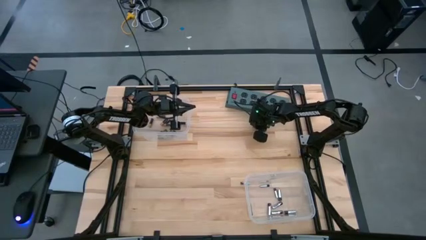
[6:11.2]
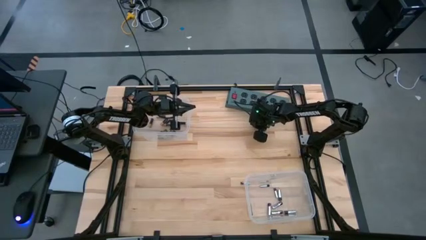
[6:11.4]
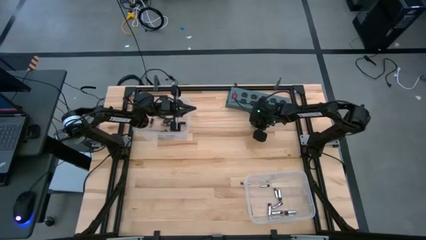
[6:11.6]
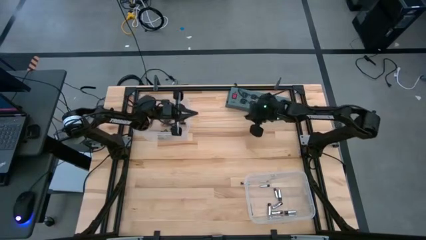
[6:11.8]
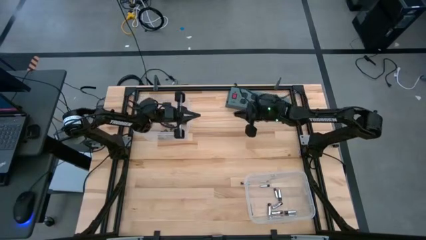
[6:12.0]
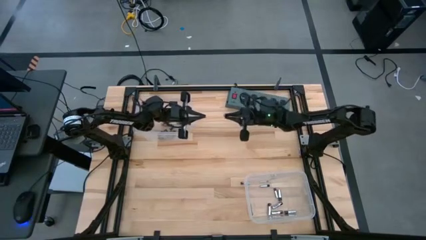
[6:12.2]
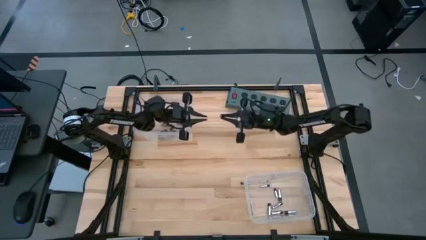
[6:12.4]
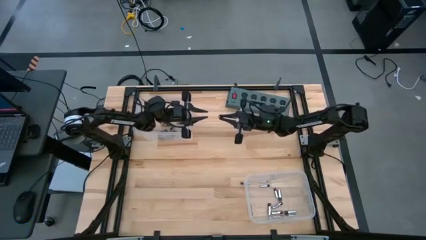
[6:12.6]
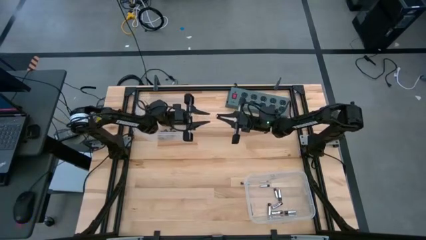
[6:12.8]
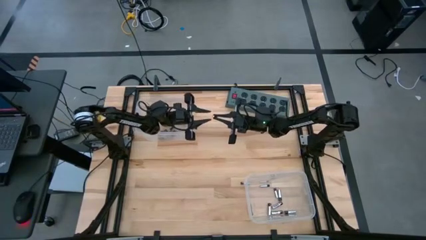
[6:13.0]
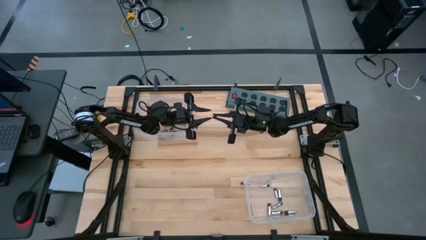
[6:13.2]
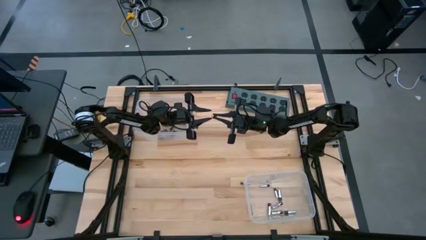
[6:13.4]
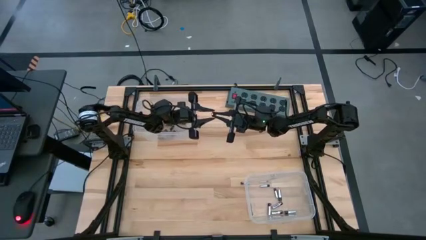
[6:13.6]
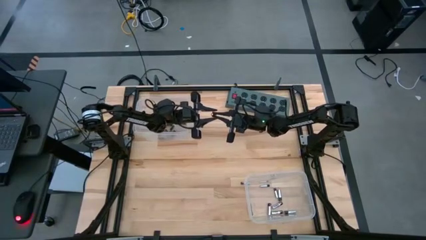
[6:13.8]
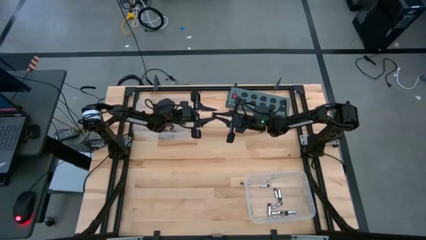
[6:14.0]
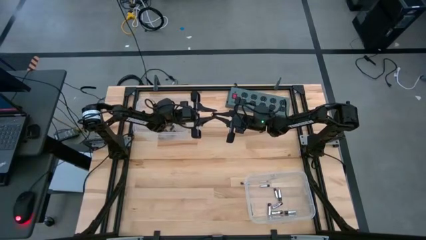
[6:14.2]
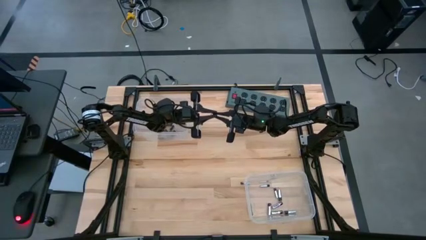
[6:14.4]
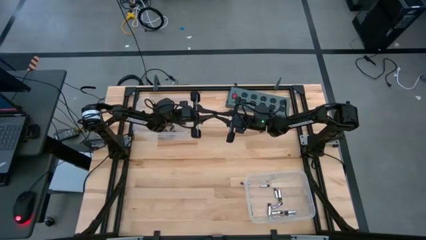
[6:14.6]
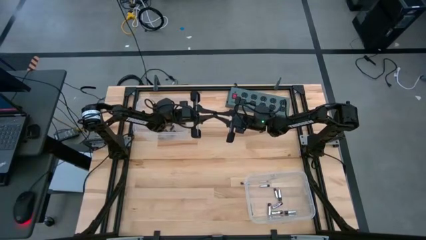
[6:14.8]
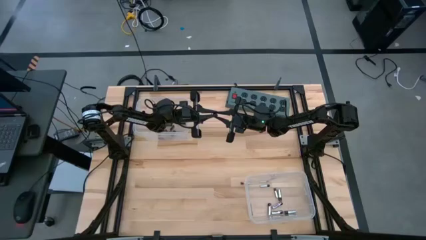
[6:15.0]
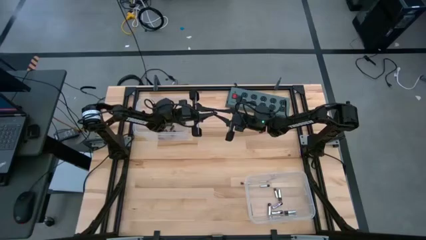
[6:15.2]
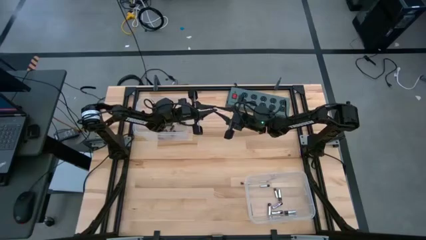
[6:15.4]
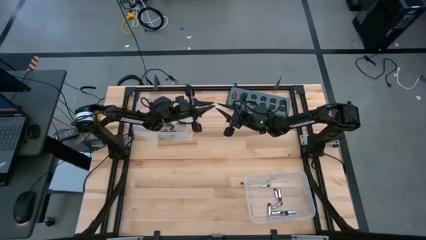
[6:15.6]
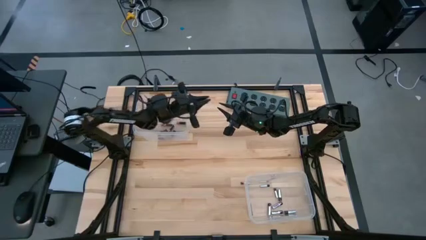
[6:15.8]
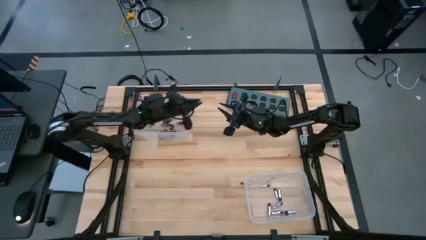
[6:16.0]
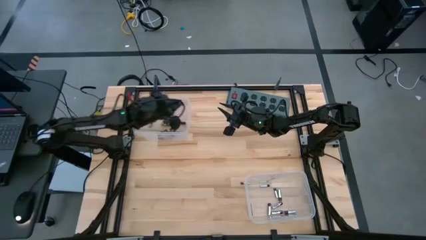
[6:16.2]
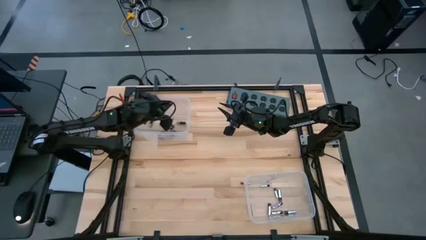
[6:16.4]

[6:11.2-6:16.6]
Task: Sort batteries
Put the black battery into the top transparent bin

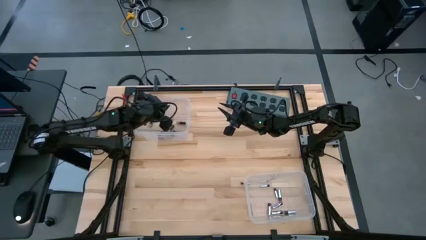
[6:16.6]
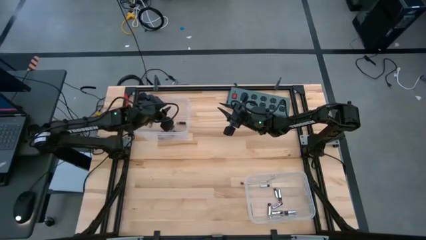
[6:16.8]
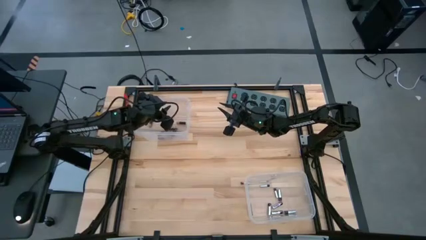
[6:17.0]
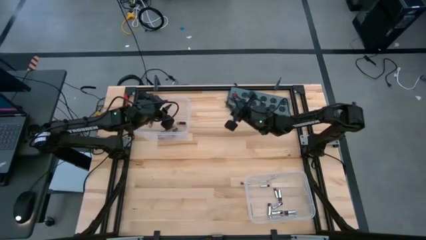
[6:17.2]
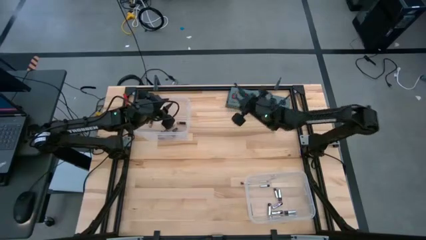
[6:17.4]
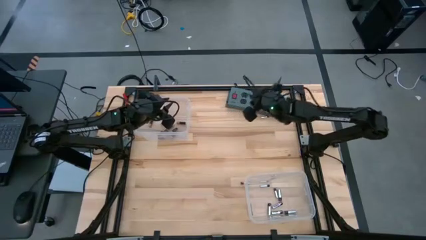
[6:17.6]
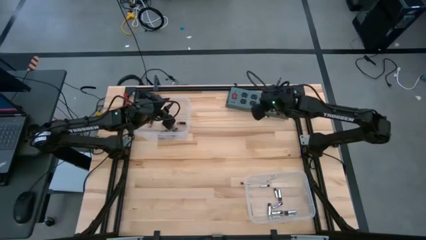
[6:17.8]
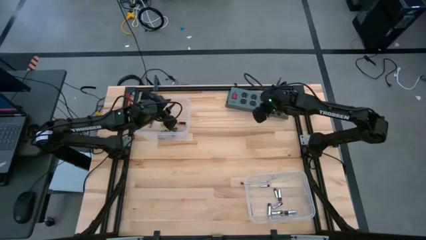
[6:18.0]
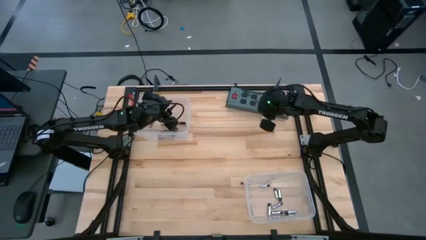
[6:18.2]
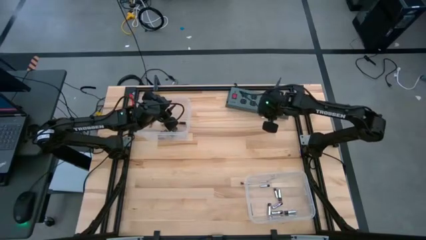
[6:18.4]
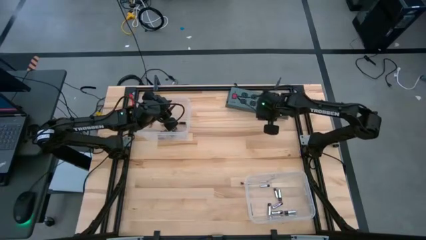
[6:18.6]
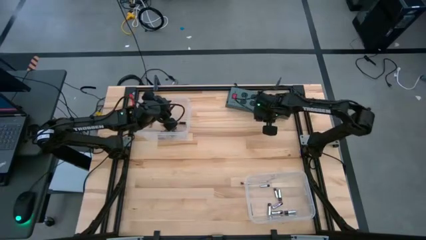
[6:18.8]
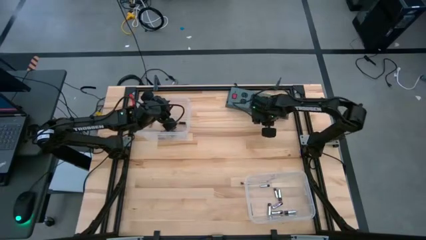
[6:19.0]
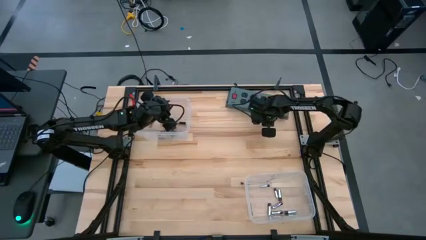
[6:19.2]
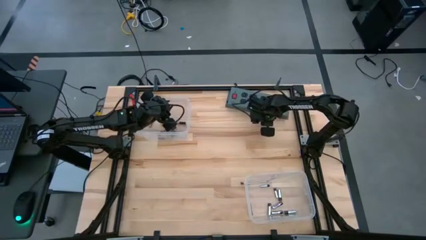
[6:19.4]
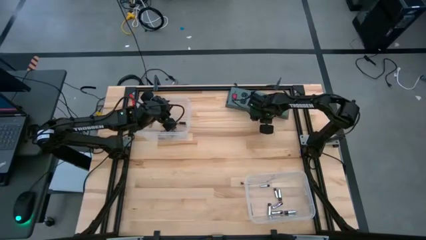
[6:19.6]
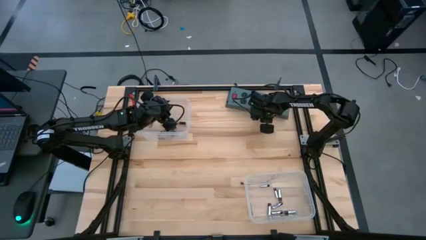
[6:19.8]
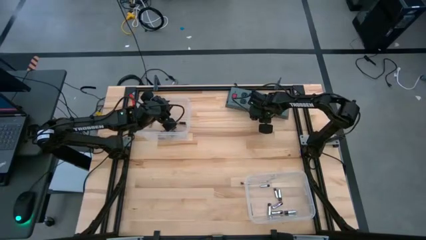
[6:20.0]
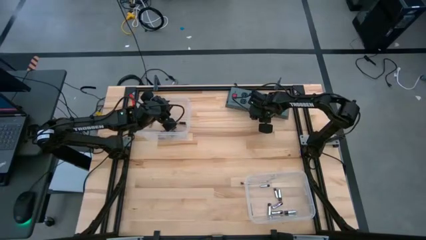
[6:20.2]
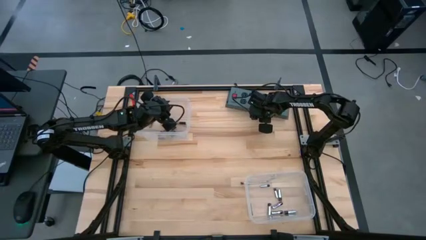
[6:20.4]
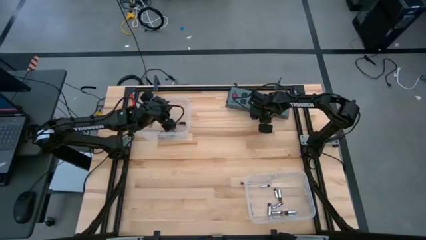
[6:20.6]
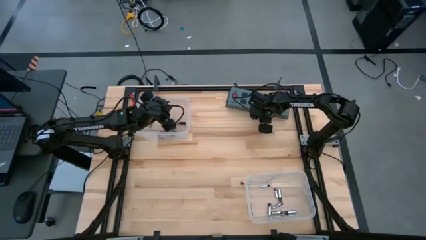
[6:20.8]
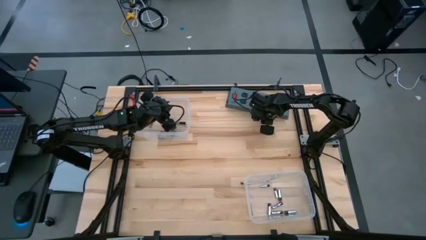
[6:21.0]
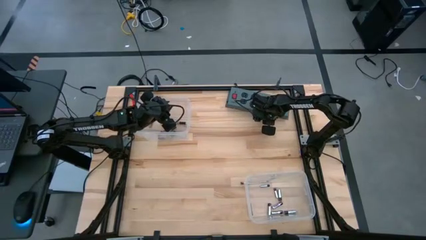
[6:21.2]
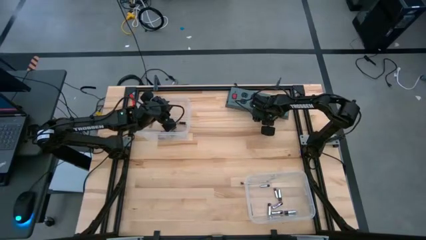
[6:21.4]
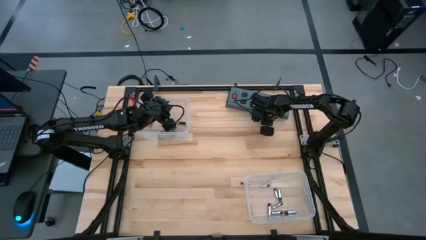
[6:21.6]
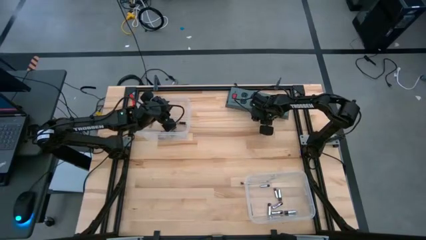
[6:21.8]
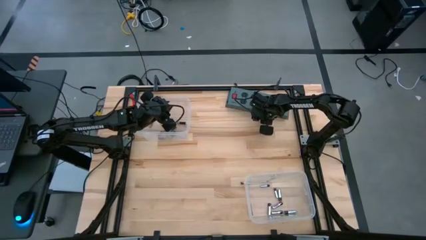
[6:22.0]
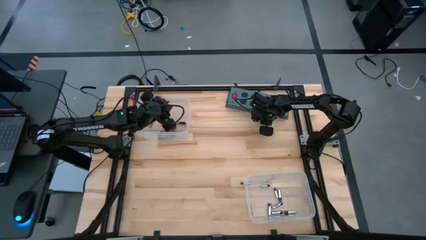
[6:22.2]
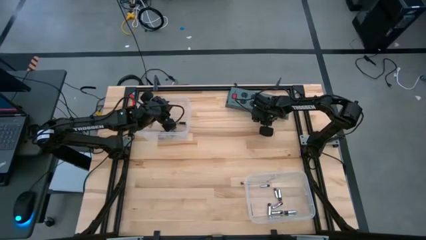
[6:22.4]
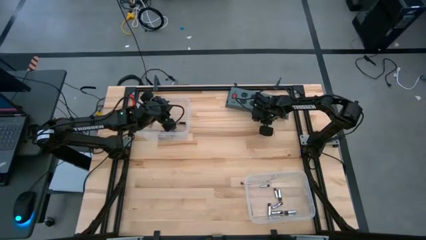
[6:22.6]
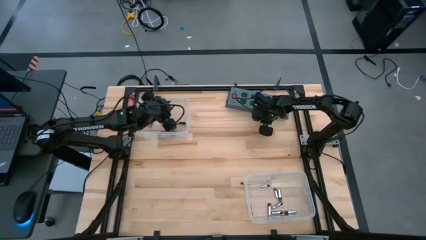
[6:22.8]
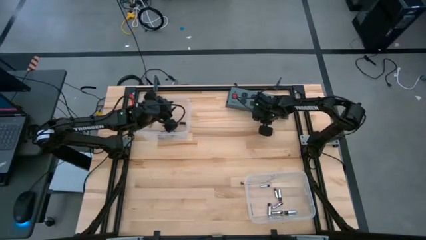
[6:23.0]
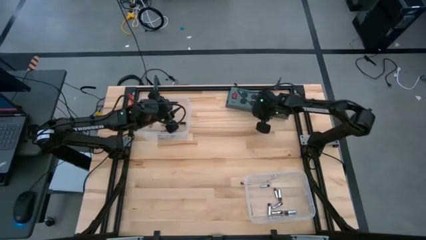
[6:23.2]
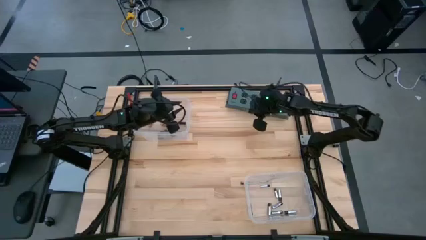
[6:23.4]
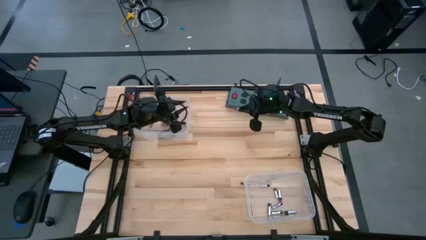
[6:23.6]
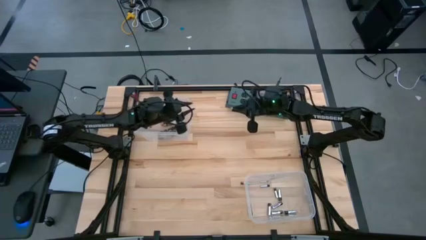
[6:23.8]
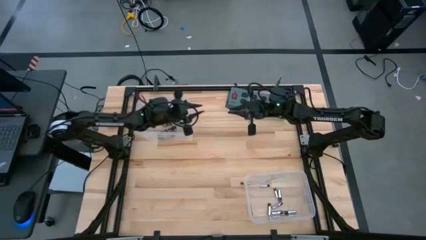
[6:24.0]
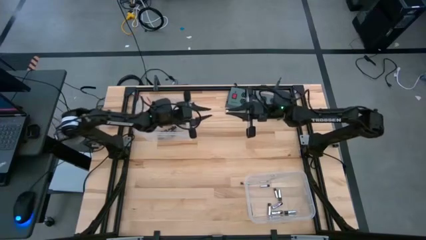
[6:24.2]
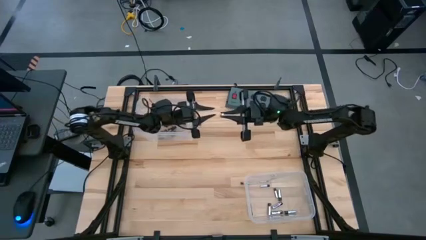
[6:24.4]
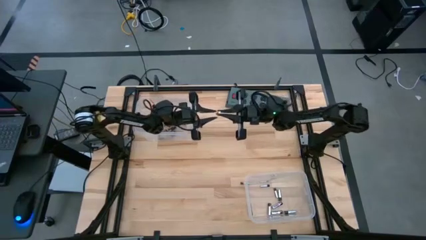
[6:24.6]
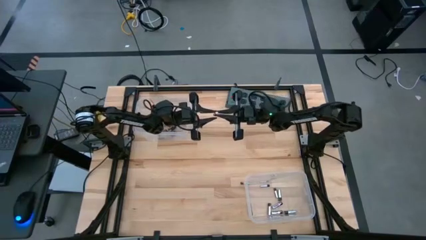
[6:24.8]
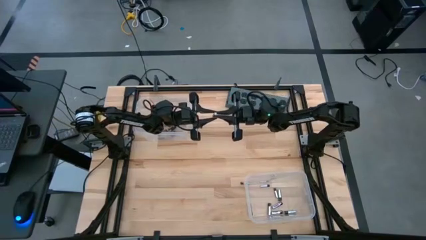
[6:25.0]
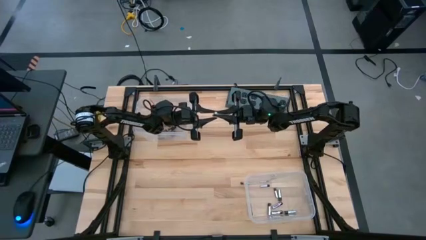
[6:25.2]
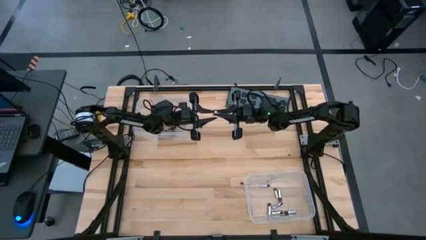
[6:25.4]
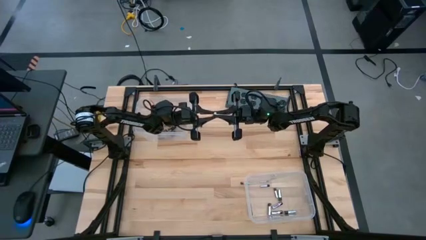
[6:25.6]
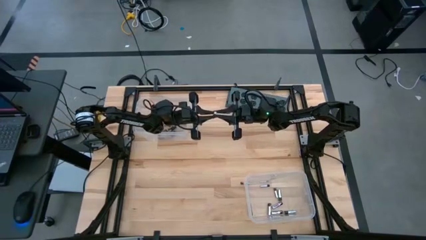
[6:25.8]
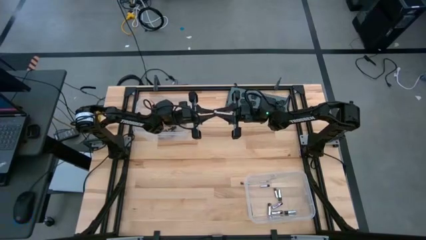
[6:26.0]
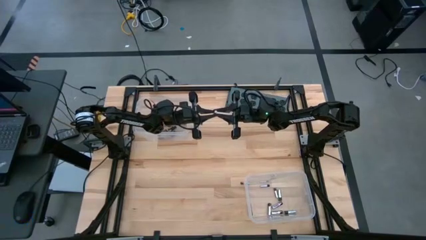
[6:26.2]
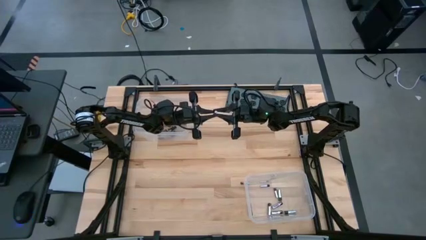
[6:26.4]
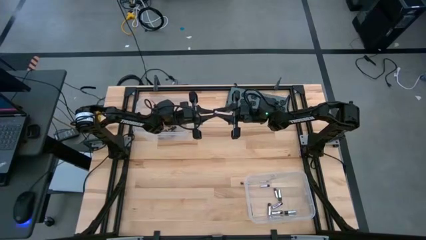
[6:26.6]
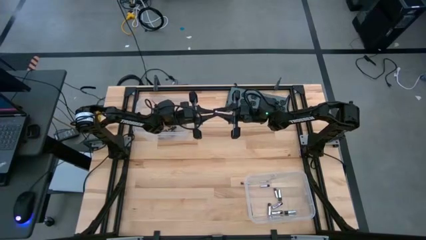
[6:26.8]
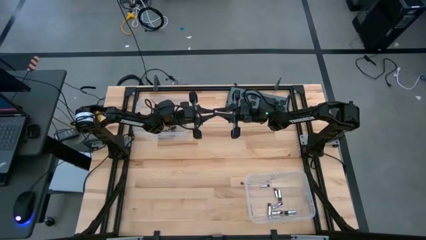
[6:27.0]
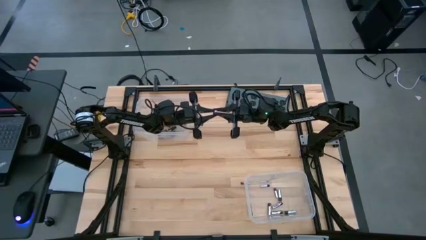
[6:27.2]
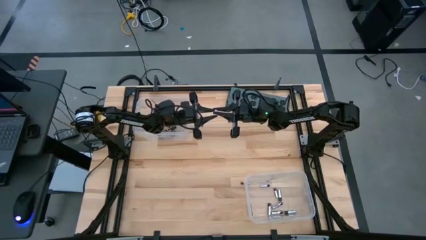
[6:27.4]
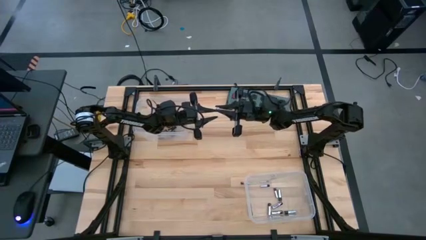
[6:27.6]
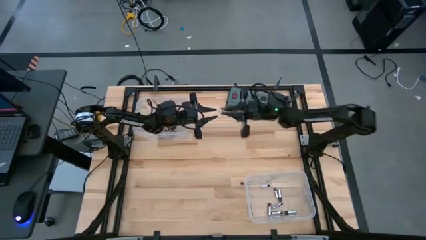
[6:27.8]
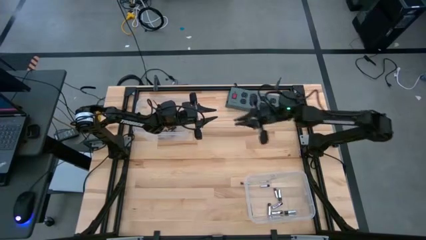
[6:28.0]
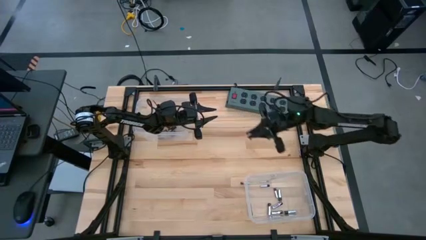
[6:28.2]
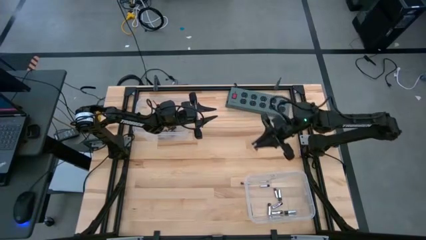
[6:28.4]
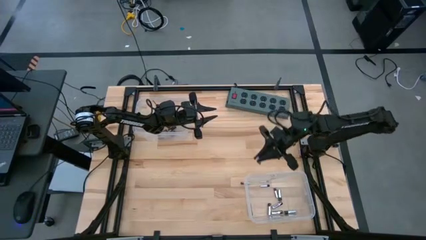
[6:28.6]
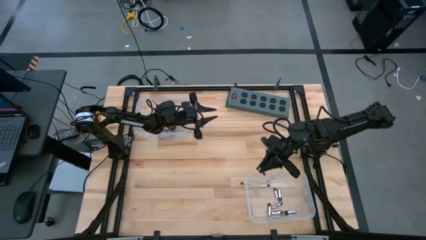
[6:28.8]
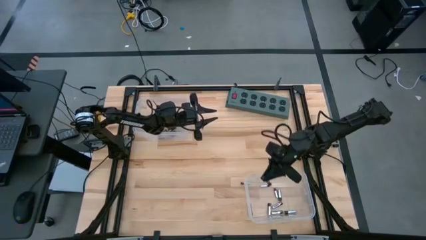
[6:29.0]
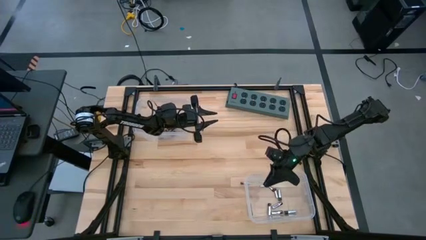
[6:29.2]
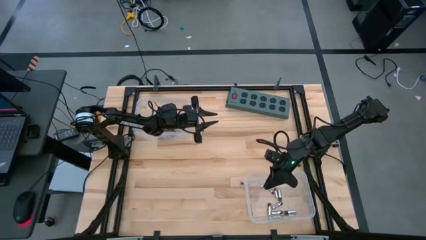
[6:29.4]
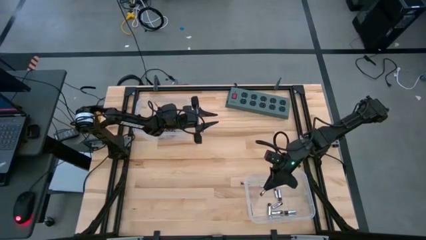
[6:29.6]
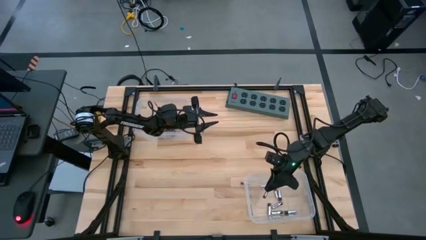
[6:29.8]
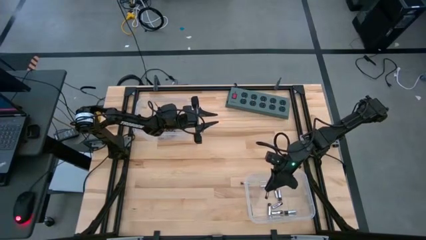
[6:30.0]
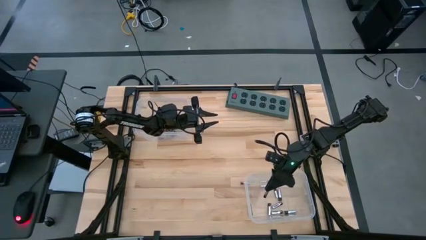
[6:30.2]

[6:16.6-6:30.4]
Put the silver battery into the bottom transparent bin
